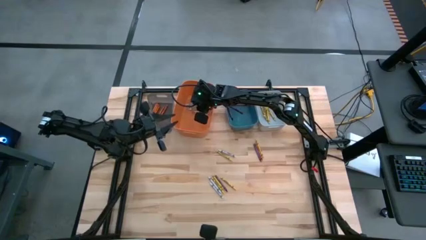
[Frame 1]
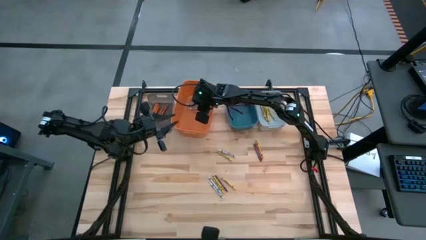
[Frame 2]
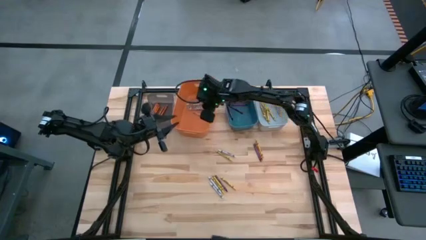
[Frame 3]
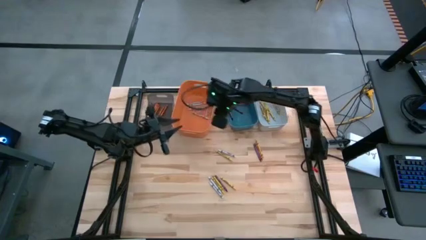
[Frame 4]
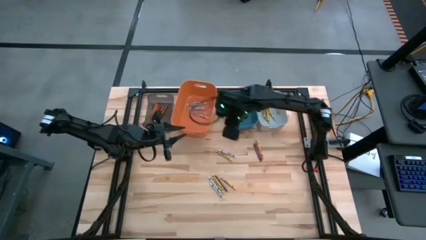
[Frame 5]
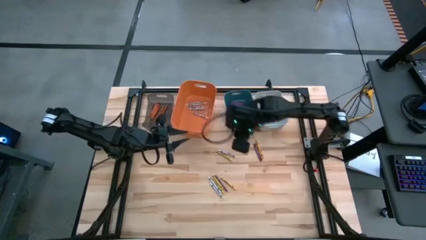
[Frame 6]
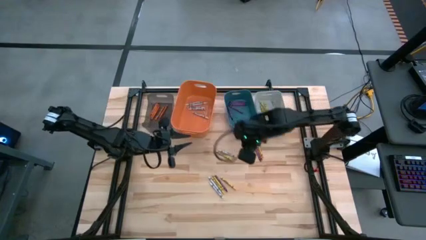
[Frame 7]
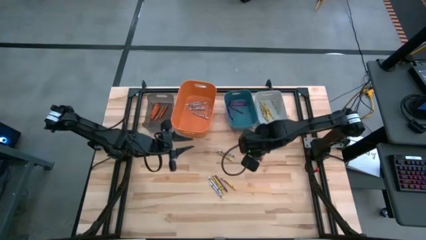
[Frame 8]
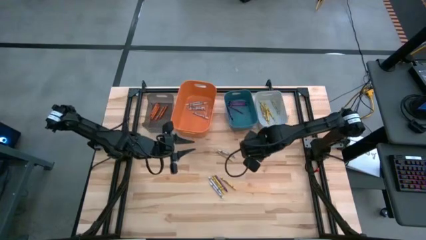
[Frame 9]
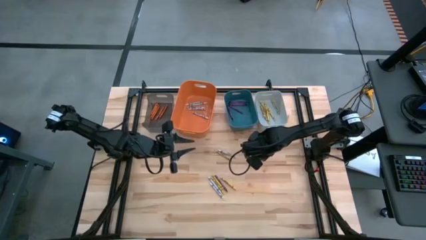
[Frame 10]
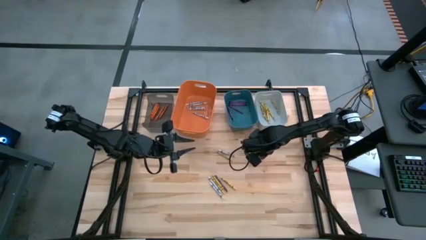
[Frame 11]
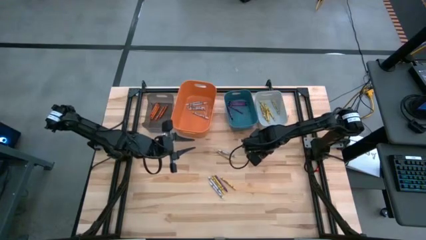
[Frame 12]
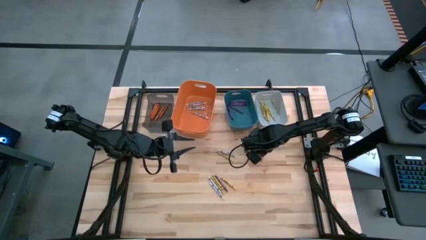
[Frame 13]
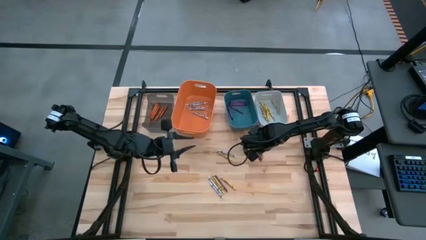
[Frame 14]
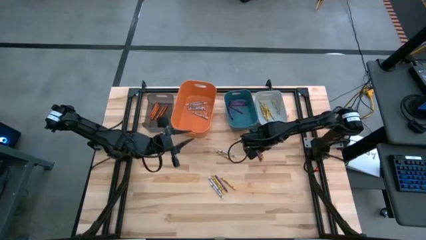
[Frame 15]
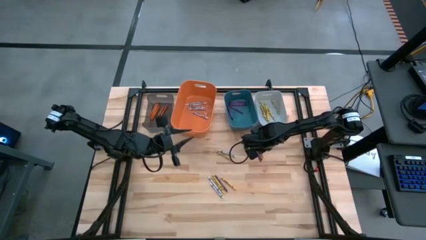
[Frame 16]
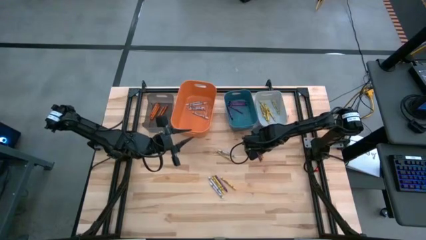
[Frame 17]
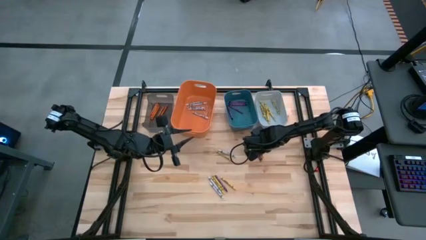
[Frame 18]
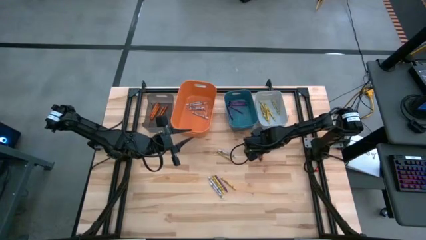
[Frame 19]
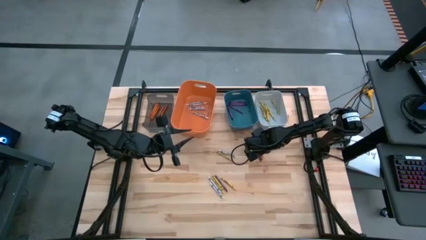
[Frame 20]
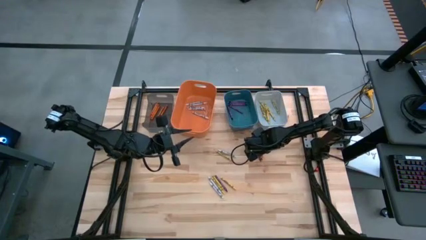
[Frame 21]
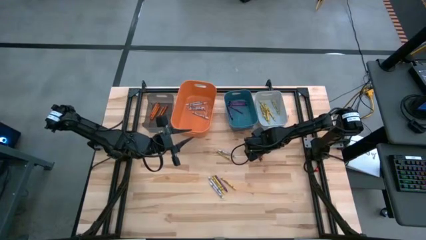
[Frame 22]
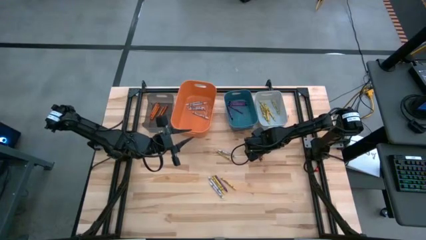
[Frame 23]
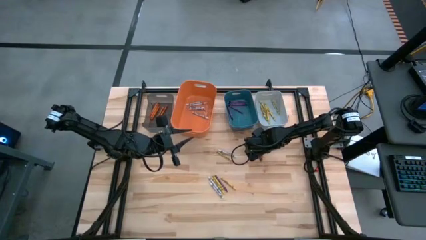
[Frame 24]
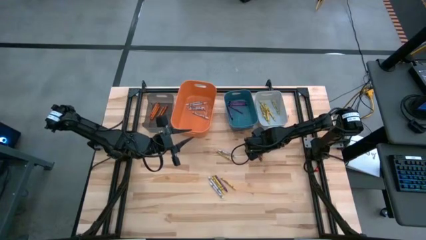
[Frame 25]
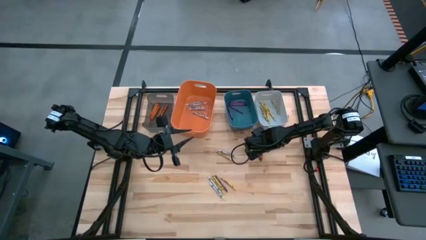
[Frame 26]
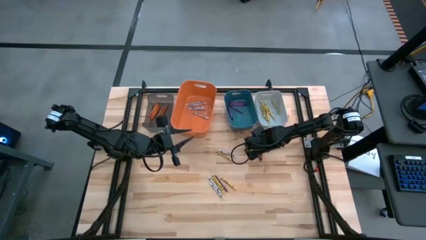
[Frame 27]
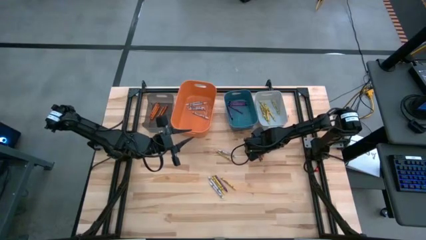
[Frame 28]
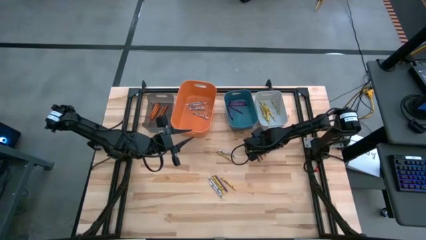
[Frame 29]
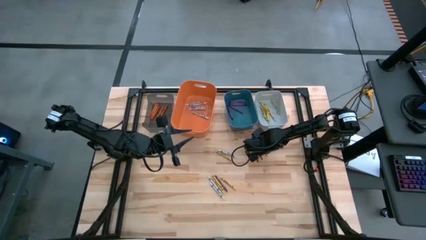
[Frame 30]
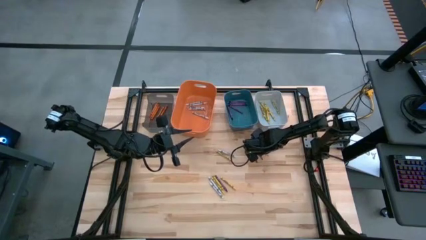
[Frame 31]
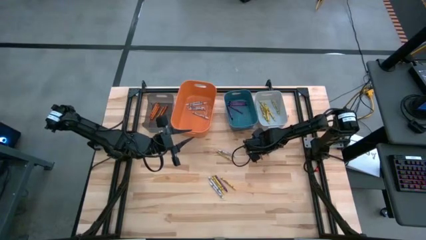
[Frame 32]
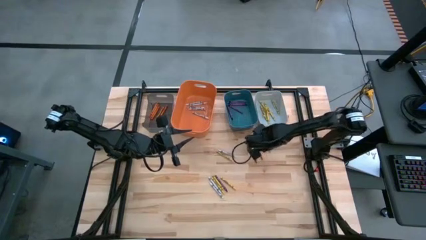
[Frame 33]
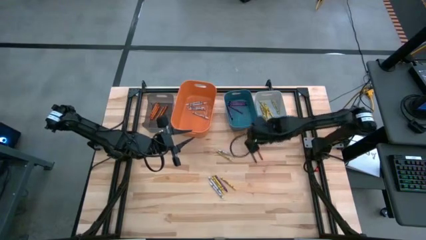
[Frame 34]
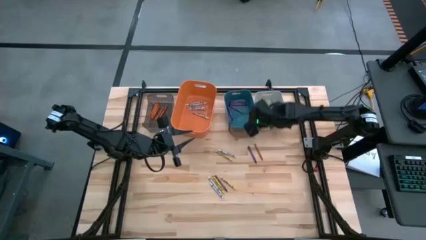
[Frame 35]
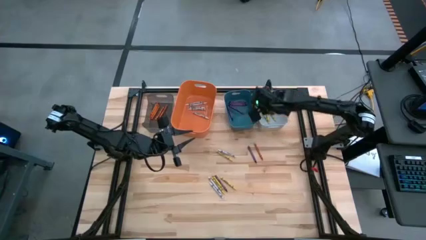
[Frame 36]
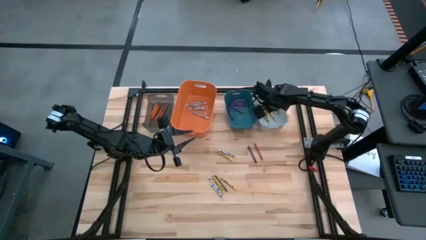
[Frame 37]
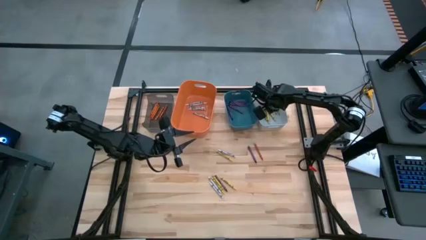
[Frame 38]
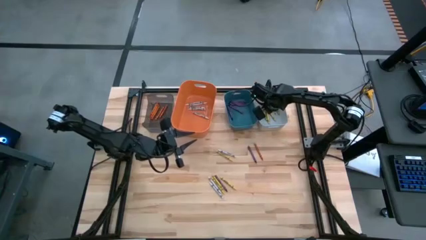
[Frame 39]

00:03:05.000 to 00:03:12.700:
Task: Sort crayons
Put the yellow crayon into the white bin

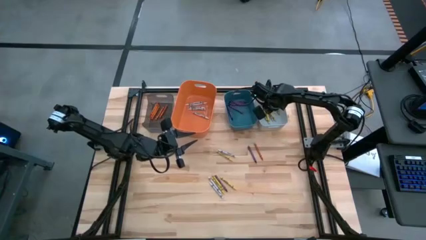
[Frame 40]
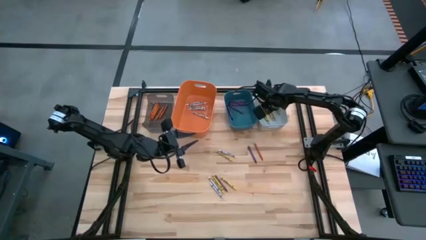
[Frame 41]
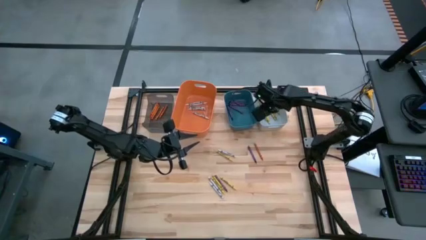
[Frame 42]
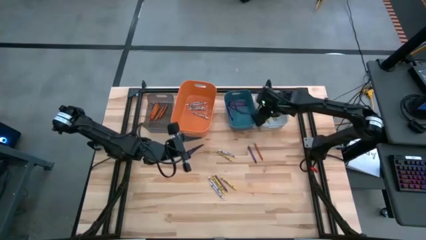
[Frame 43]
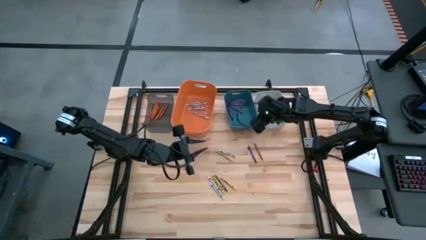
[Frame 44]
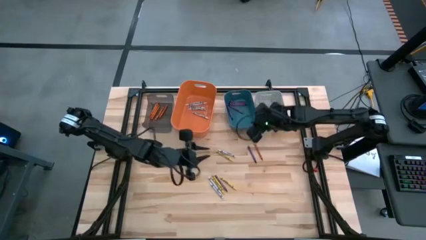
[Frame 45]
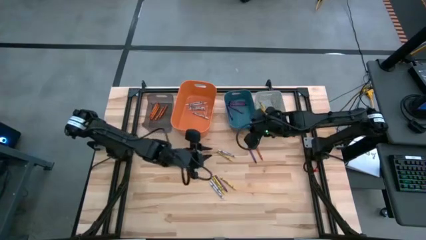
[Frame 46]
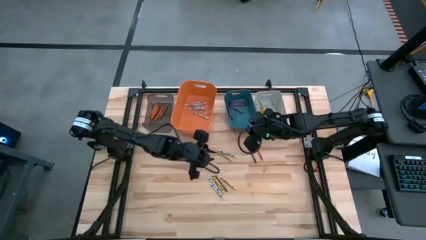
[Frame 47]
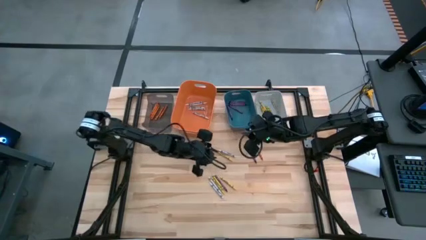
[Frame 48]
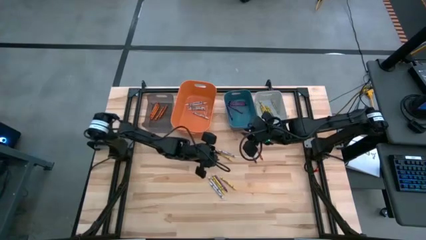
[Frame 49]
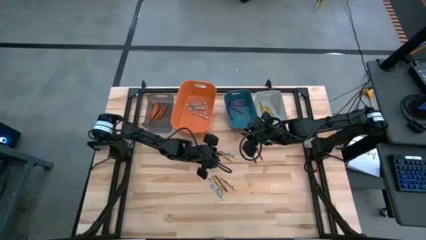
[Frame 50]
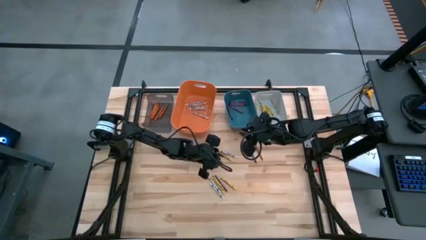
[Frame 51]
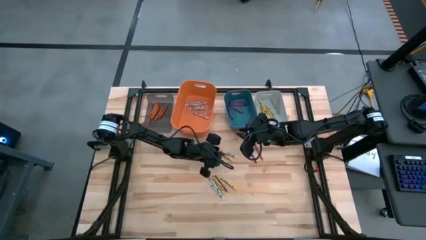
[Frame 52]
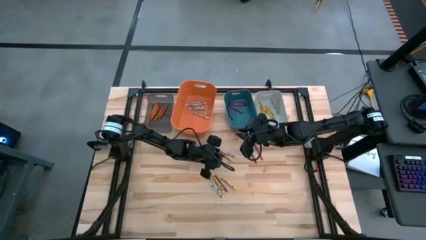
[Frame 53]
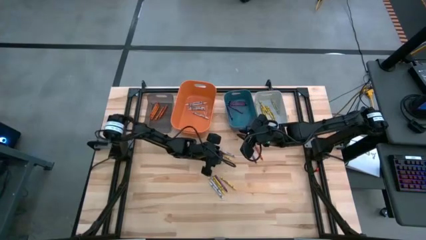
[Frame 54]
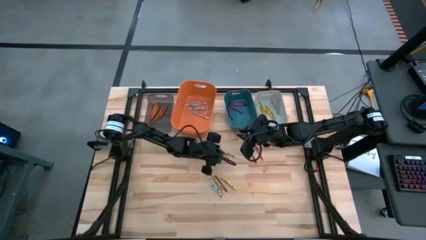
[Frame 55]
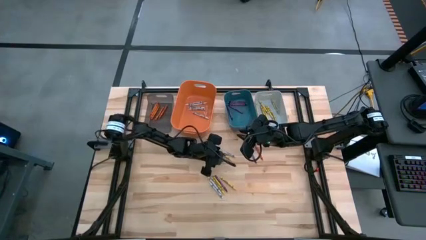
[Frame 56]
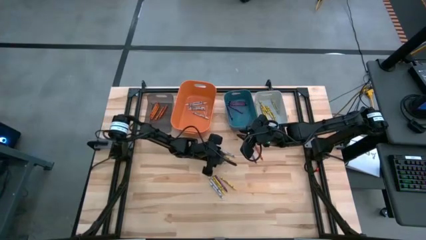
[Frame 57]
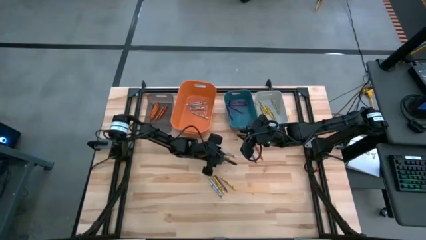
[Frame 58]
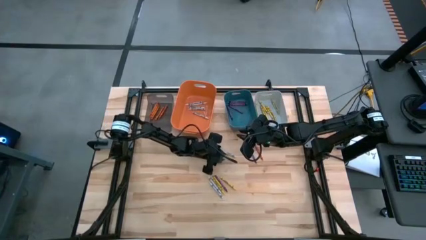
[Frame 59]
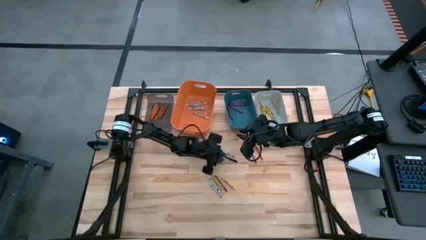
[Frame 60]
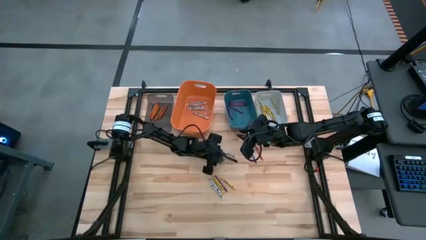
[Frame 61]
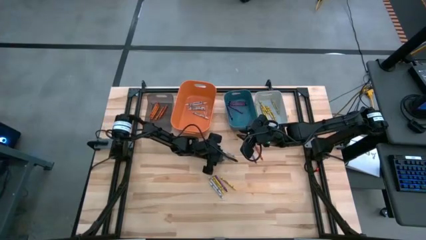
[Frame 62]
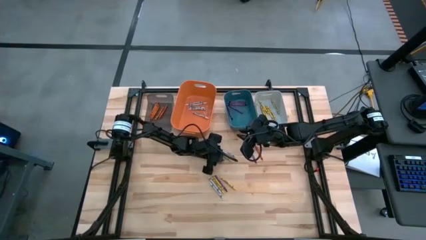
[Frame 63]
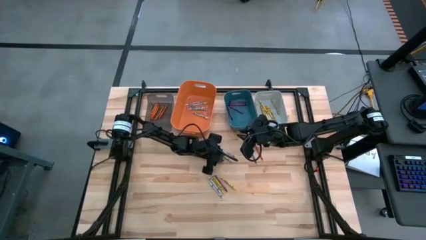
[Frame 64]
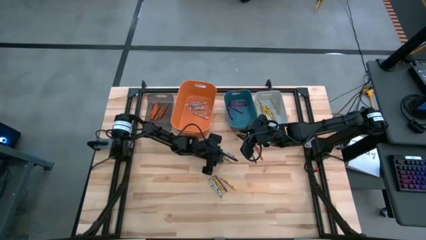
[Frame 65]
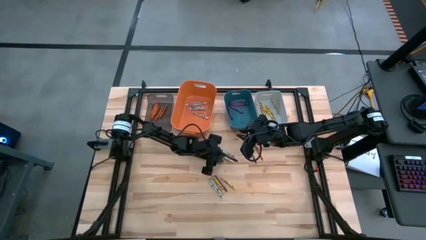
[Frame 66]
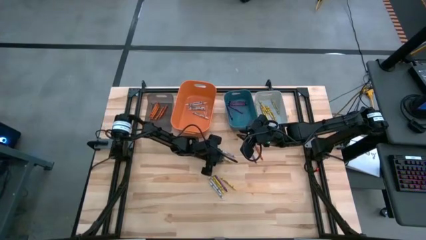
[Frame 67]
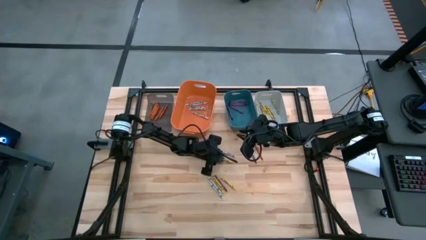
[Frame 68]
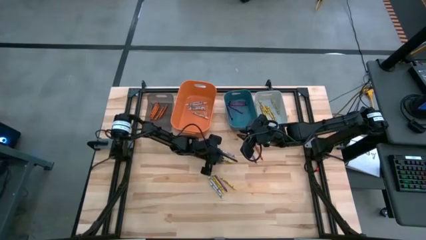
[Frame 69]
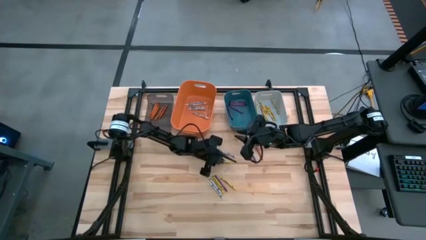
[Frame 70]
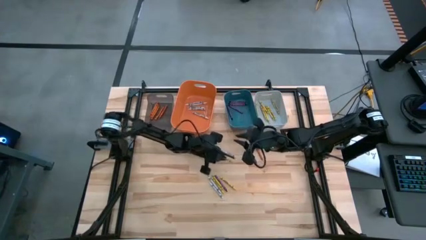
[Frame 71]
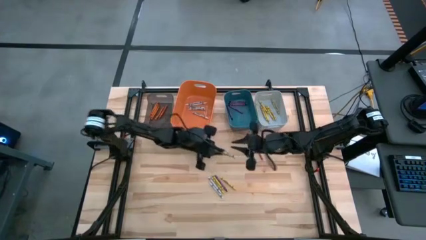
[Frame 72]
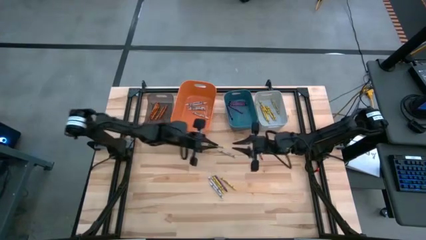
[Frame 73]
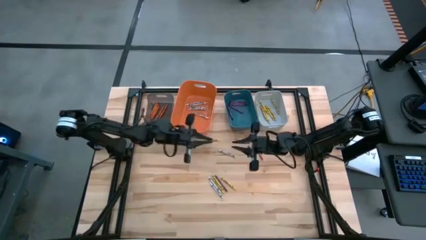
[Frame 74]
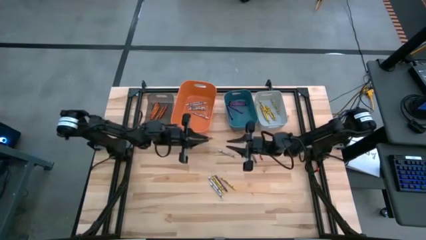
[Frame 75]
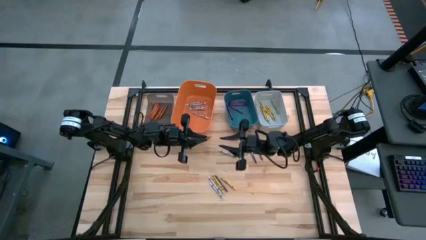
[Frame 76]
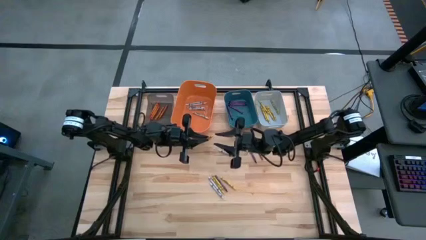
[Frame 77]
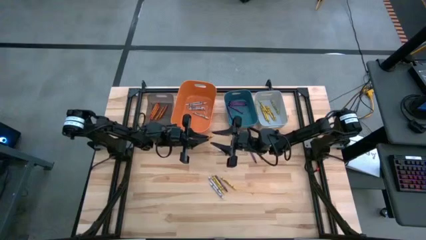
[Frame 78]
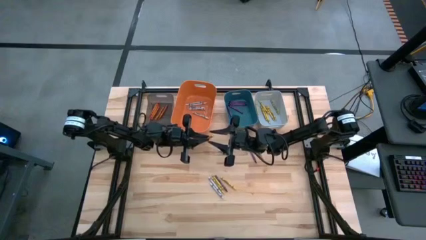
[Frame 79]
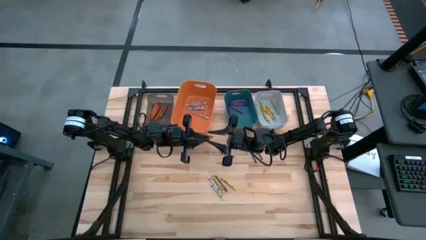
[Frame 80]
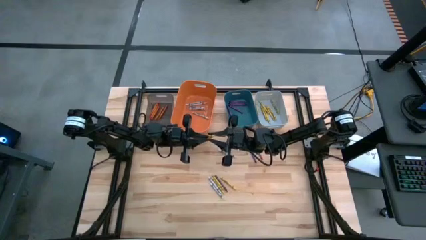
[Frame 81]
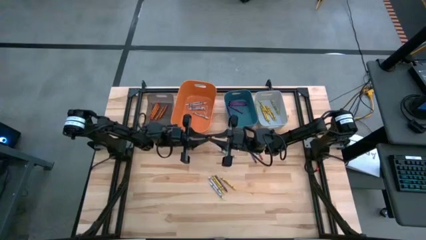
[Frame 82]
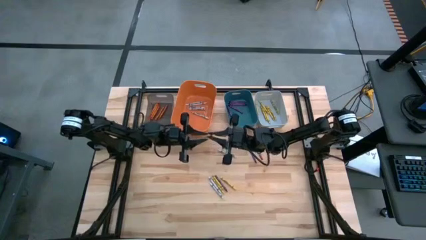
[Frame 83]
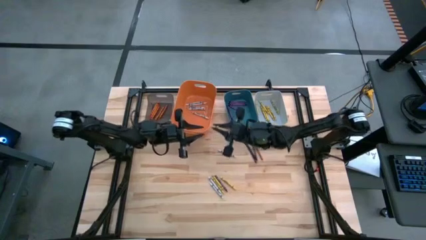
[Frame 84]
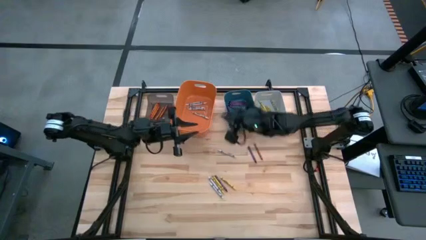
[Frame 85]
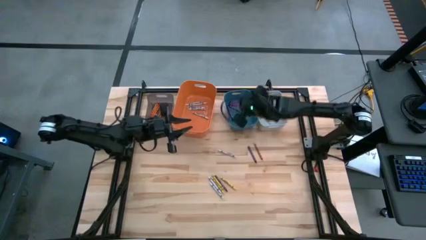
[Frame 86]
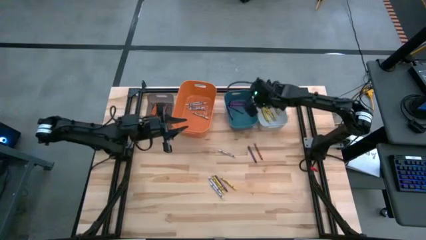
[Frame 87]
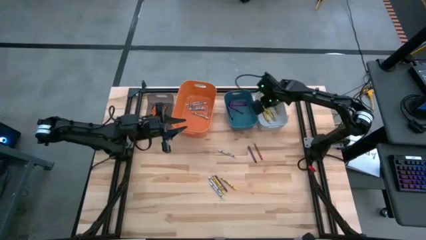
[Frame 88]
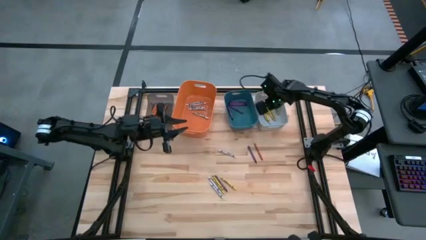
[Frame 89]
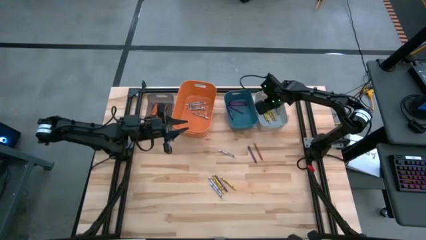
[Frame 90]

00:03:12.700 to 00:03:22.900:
Put the yellow crayon into the white bin
